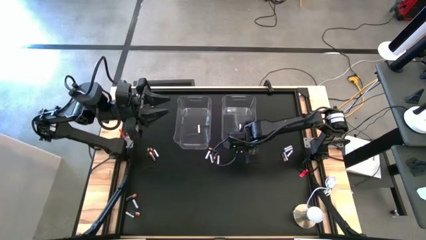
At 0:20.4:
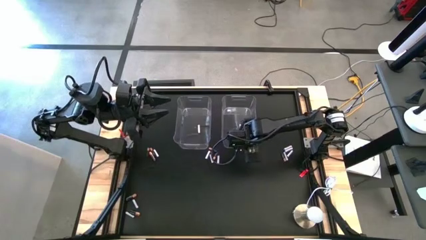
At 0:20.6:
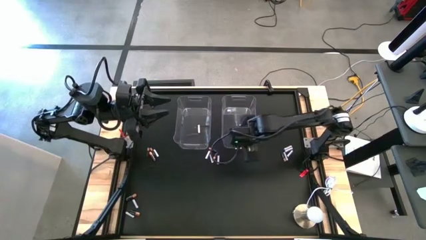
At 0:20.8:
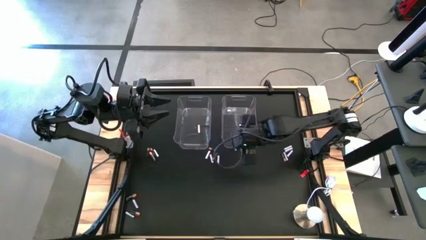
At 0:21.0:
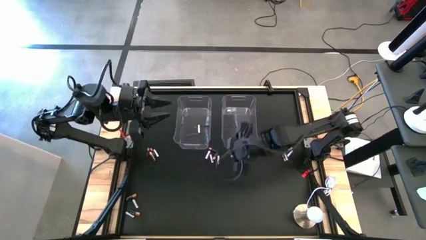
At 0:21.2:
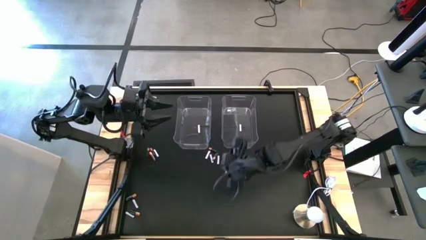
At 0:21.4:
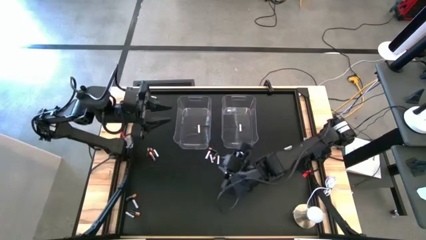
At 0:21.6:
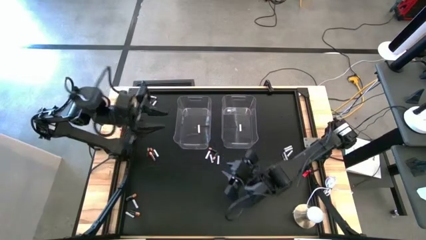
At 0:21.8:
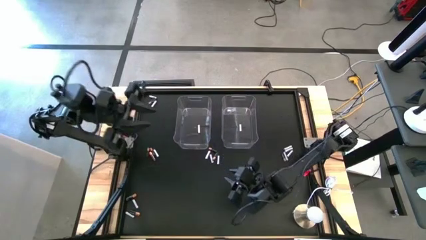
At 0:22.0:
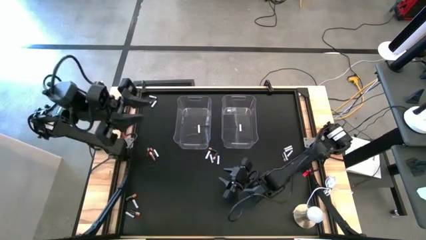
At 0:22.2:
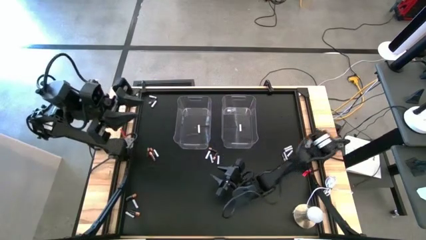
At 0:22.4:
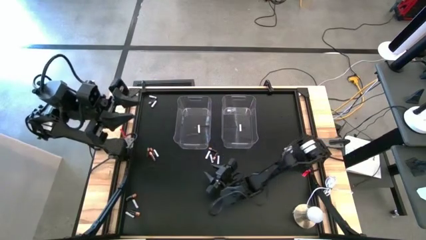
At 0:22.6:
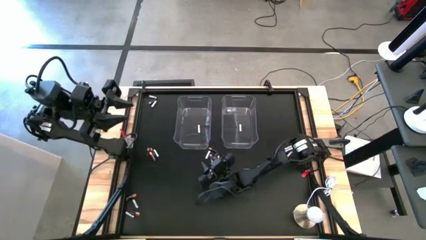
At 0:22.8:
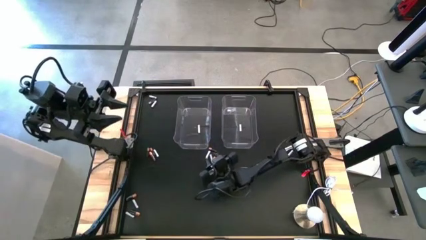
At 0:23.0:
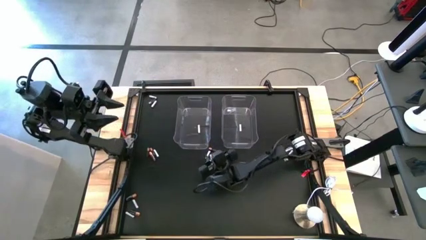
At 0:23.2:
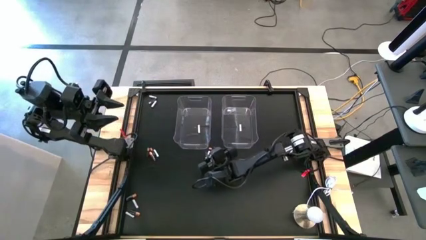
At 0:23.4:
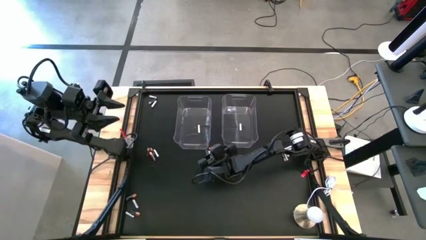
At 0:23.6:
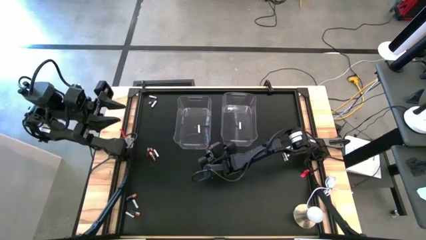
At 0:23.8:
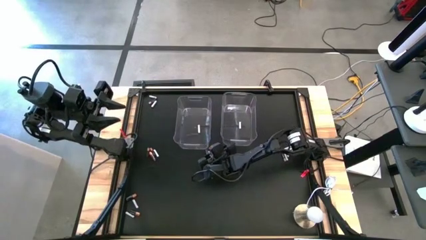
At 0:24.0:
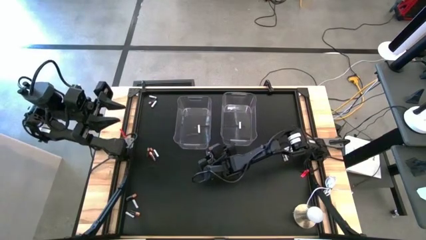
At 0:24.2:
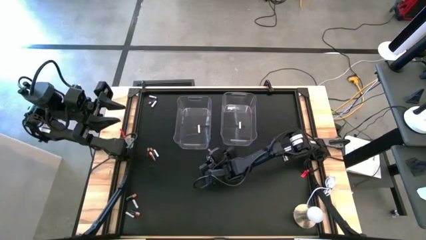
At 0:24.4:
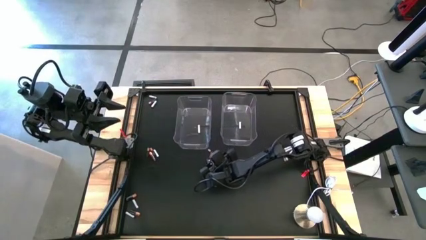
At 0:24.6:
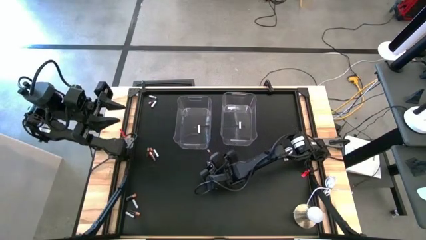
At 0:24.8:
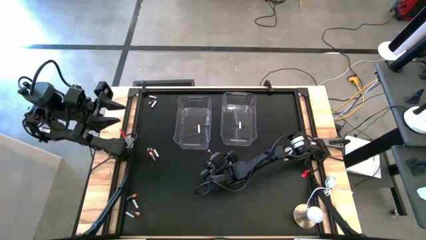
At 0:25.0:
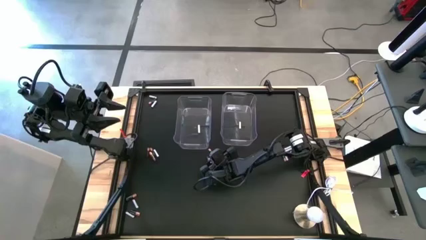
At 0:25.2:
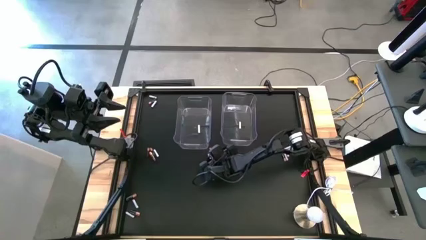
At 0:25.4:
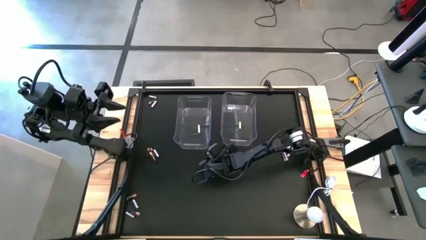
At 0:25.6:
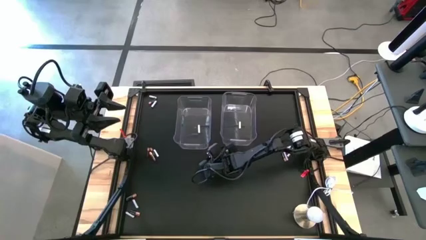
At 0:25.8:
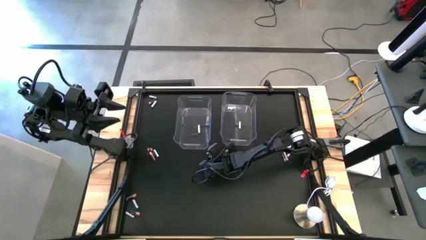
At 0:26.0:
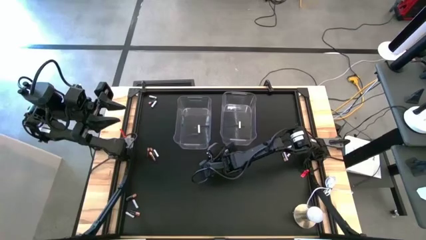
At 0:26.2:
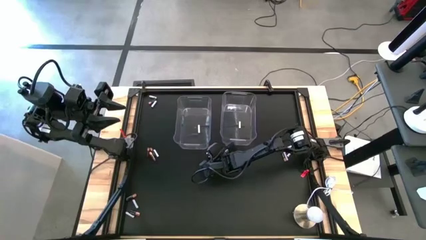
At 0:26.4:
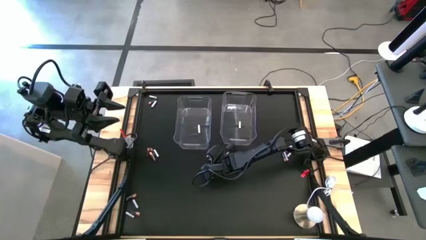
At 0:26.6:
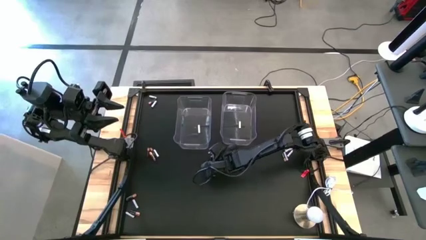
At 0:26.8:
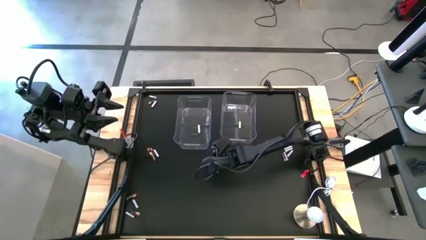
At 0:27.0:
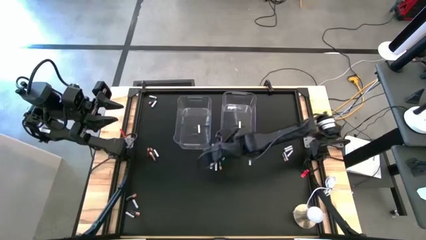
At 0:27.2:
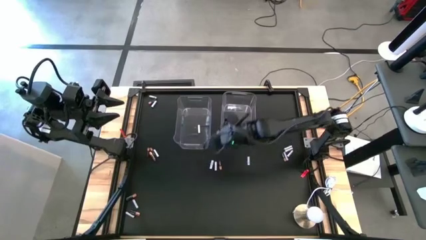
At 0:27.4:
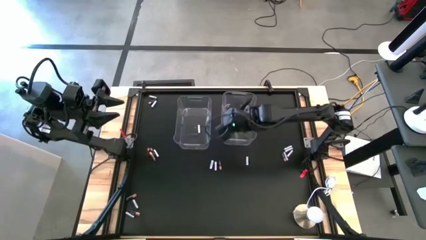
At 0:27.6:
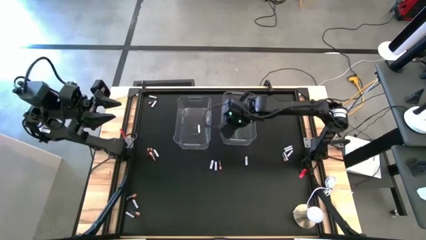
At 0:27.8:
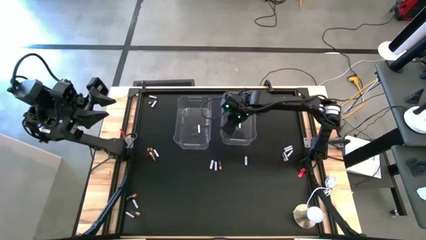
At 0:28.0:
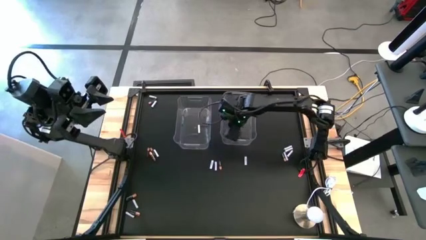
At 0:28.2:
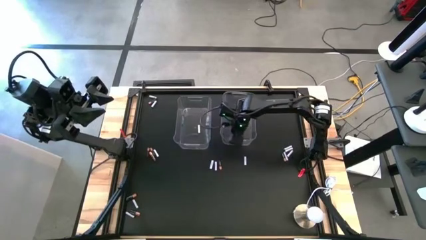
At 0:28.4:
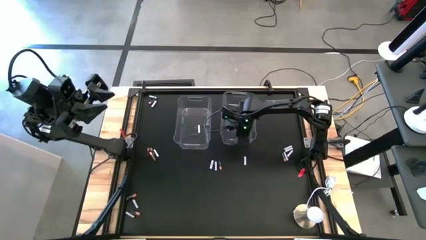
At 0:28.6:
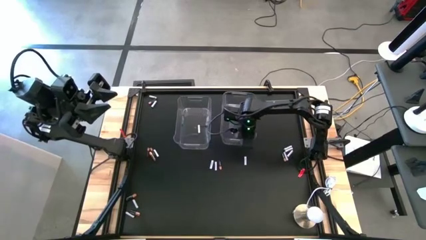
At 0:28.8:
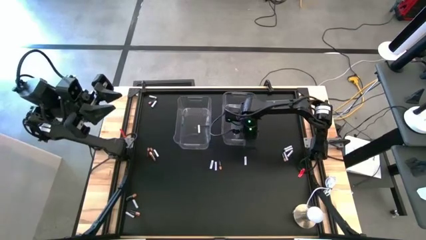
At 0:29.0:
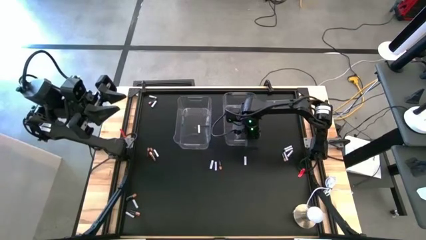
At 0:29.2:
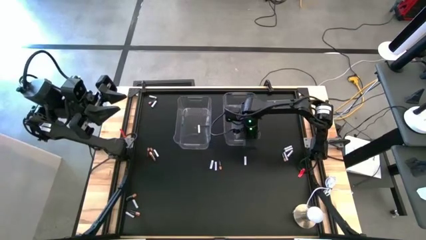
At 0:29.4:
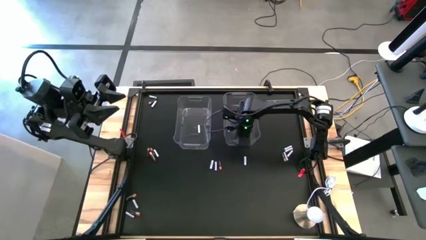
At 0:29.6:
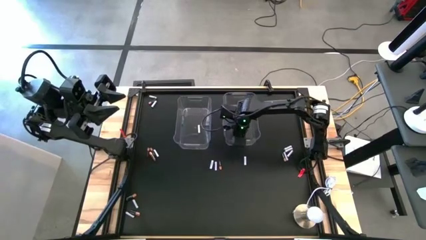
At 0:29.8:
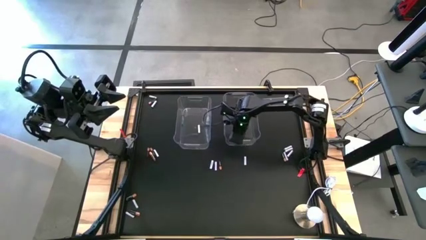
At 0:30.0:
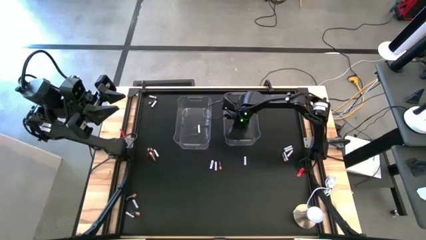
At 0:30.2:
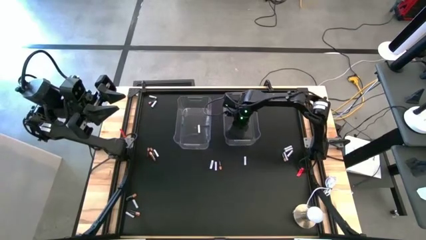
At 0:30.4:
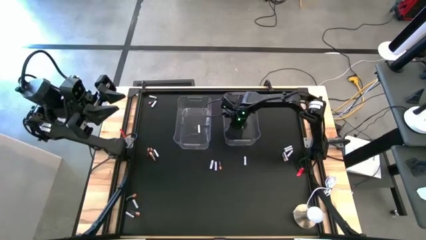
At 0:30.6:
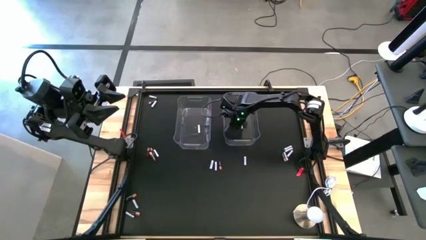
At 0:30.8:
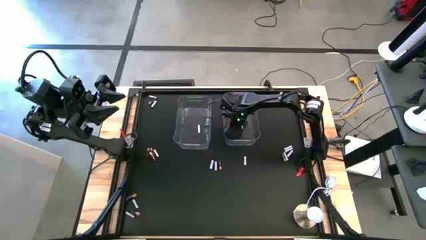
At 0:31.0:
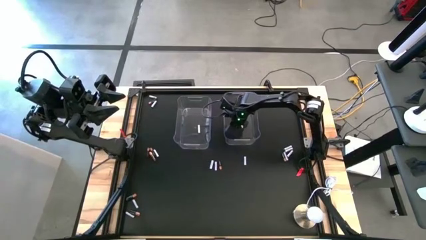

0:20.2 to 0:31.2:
Task: Sort batteries
Put the black battery into the right transparent bin
